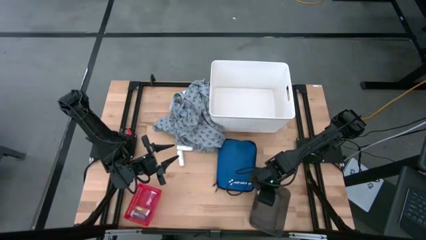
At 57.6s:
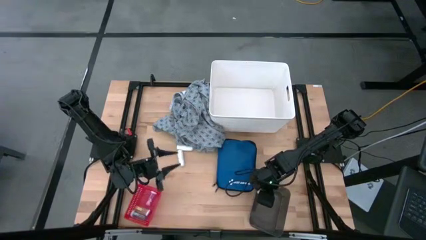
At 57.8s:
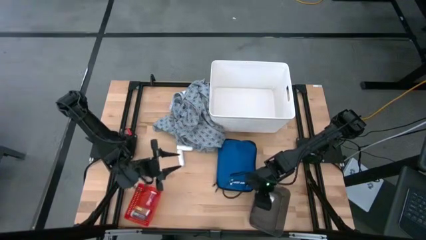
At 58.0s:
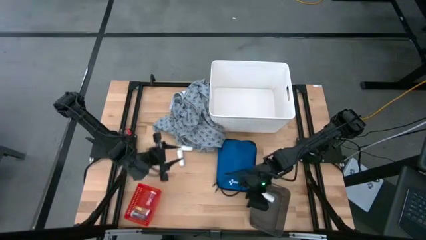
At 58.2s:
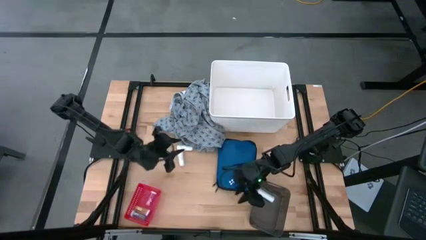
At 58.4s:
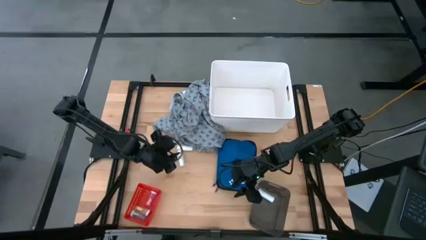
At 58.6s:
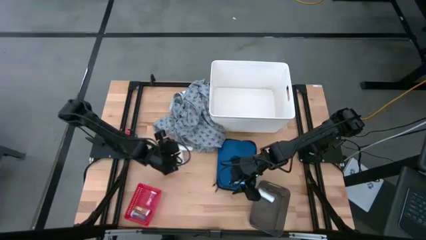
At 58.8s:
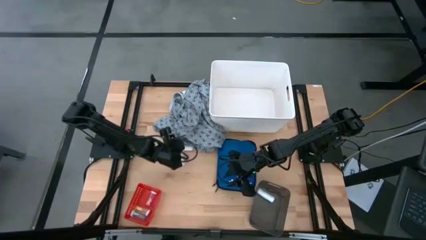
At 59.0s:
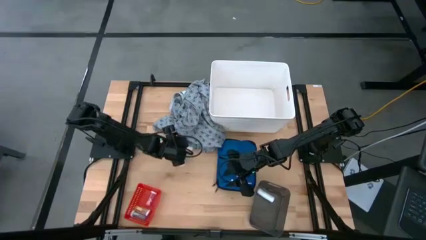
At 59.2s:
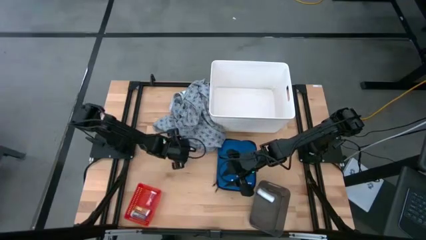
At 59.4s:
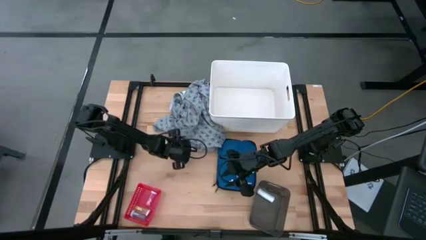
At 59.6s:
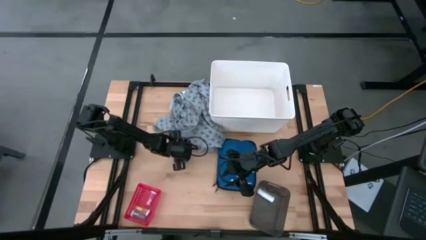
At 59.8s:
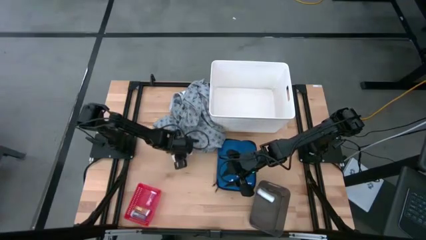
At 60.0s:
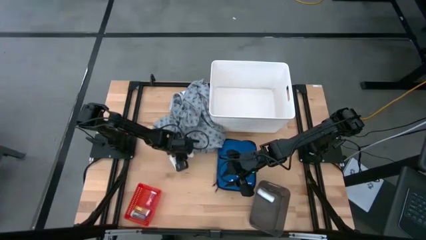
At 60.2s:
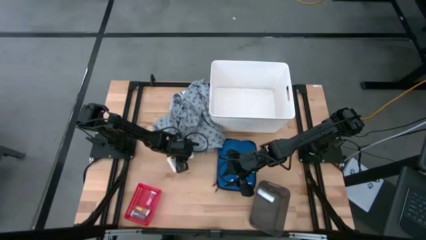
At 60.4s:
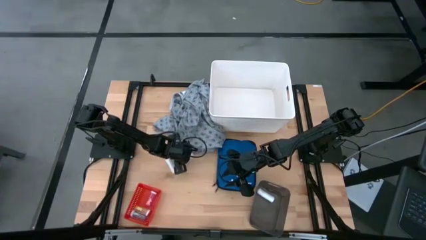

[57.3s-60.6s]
Task: Pick & Place Medicine items
Put the top white rolled gauze into the black bin

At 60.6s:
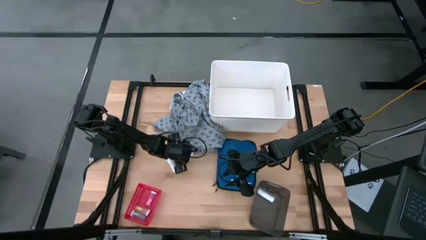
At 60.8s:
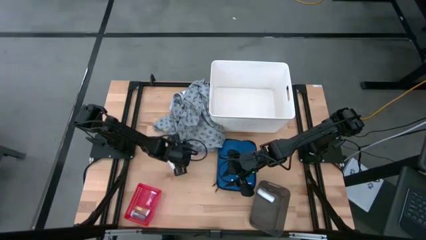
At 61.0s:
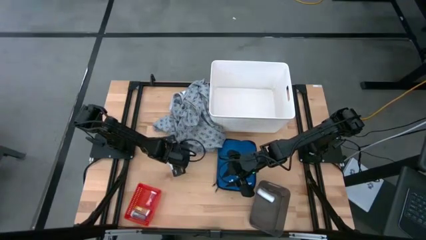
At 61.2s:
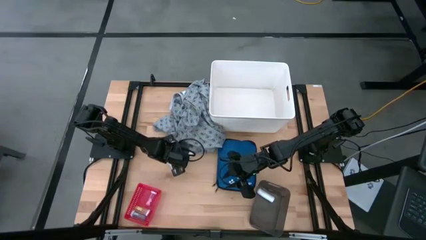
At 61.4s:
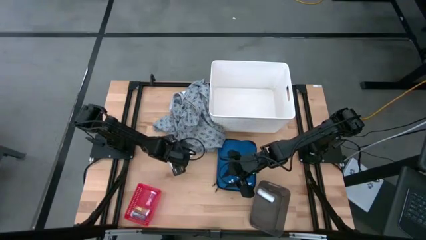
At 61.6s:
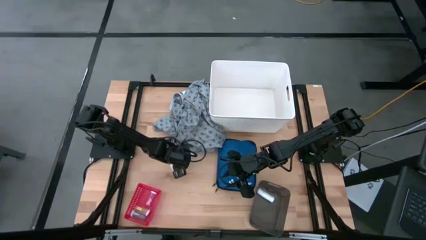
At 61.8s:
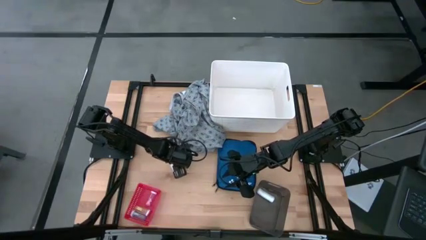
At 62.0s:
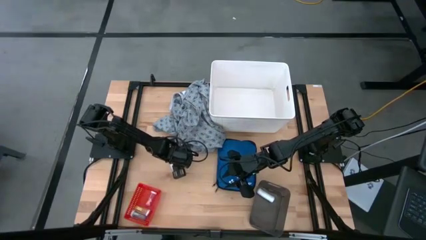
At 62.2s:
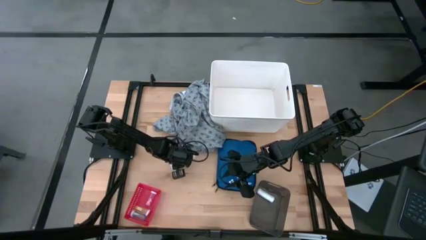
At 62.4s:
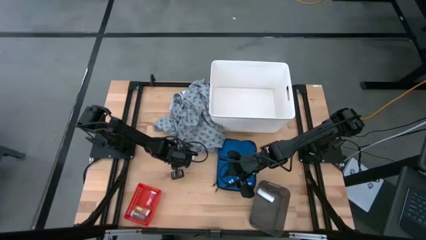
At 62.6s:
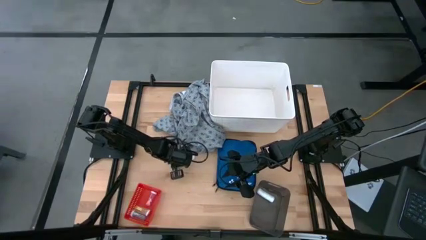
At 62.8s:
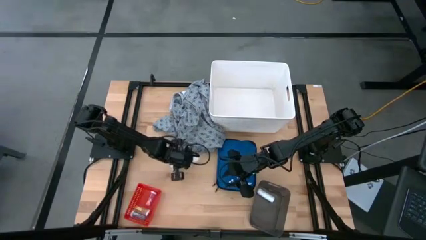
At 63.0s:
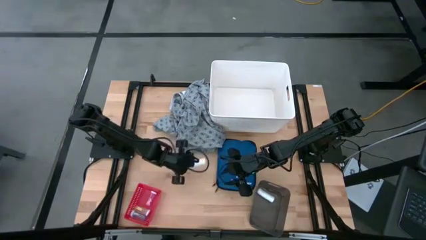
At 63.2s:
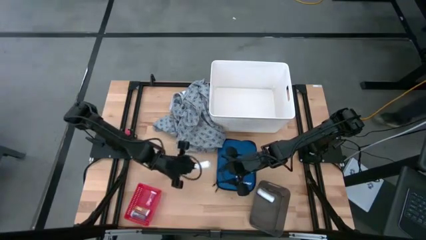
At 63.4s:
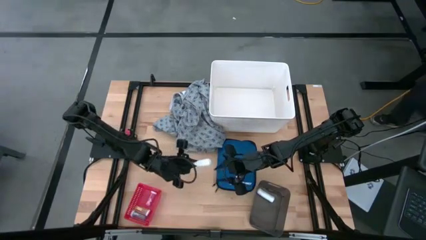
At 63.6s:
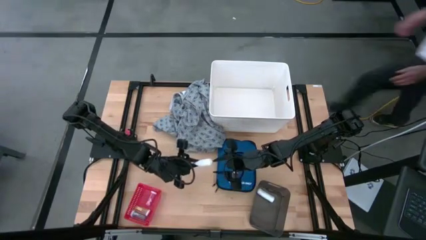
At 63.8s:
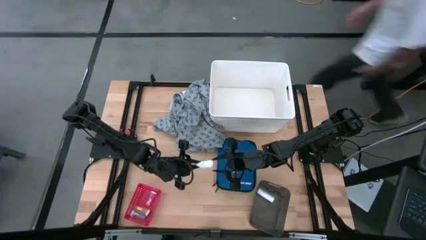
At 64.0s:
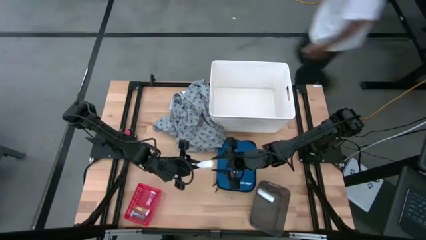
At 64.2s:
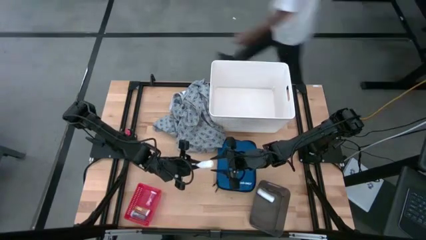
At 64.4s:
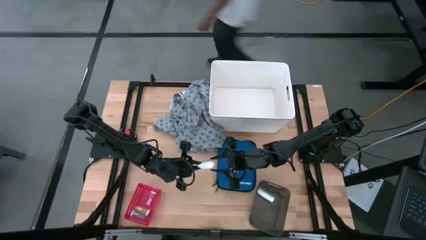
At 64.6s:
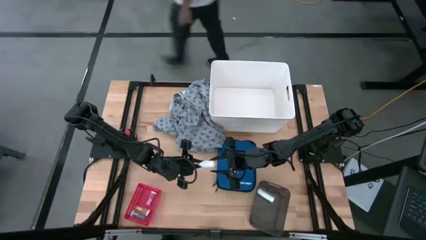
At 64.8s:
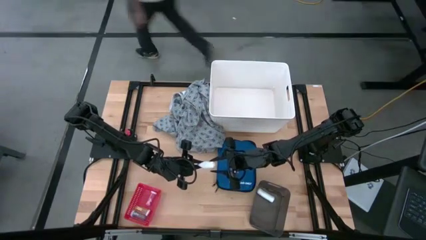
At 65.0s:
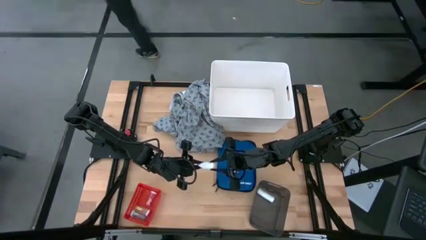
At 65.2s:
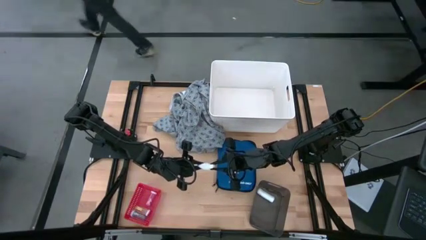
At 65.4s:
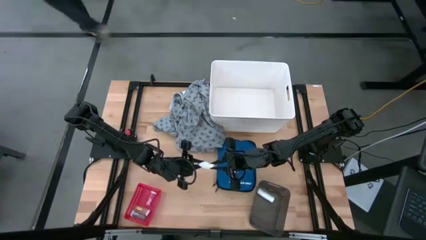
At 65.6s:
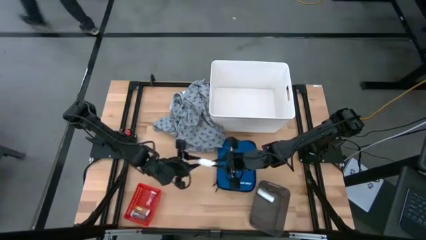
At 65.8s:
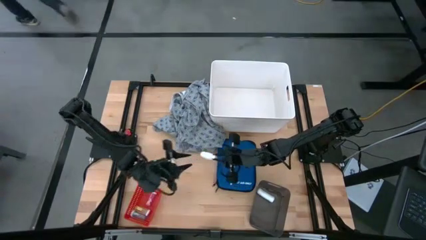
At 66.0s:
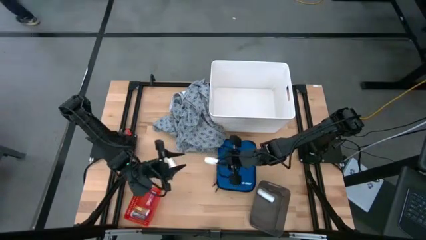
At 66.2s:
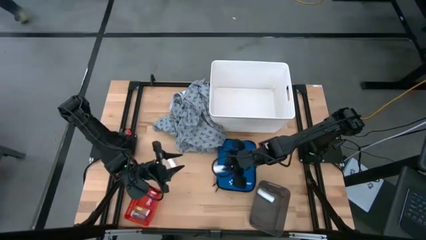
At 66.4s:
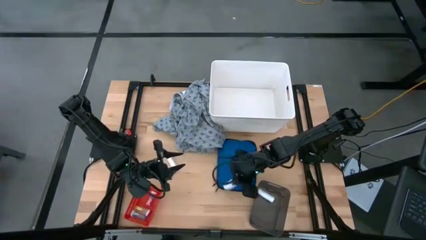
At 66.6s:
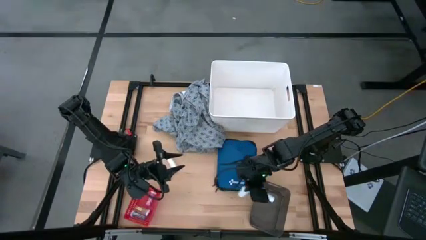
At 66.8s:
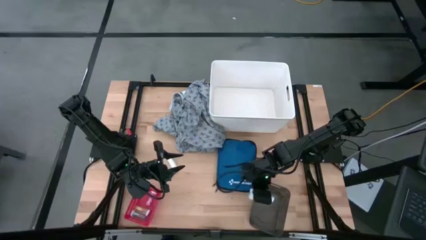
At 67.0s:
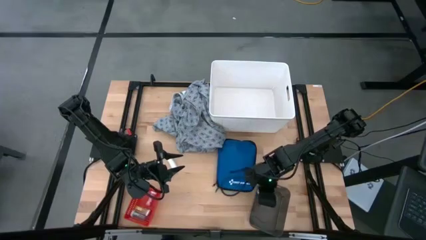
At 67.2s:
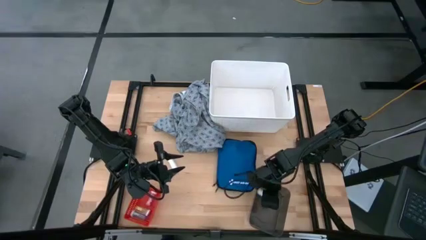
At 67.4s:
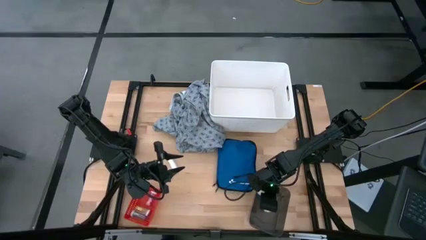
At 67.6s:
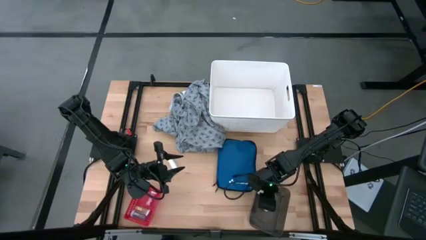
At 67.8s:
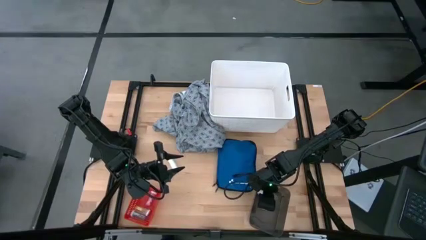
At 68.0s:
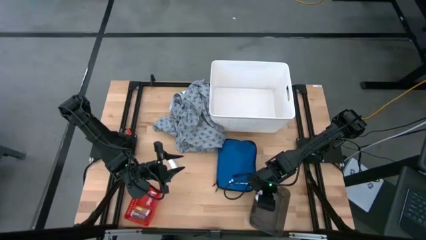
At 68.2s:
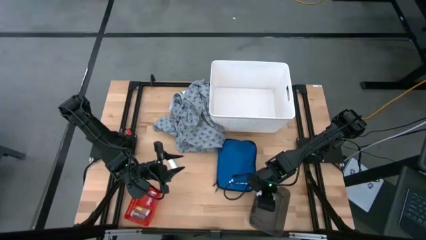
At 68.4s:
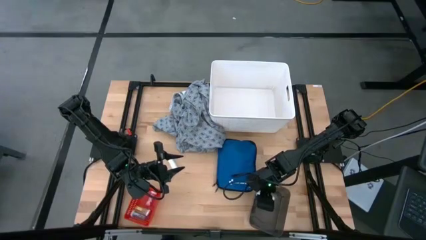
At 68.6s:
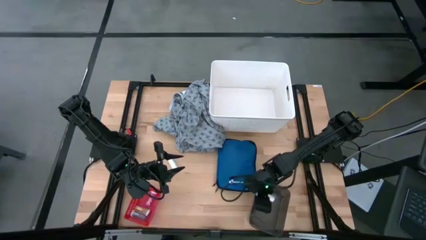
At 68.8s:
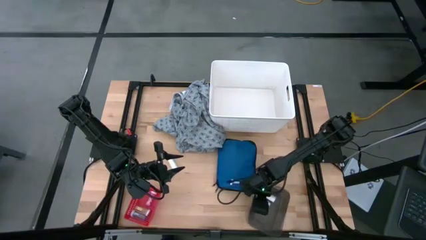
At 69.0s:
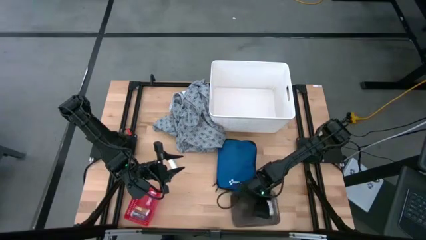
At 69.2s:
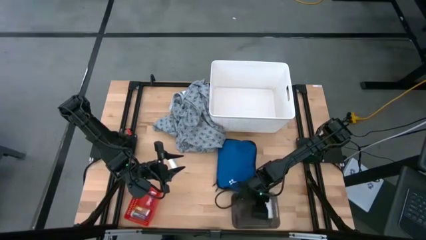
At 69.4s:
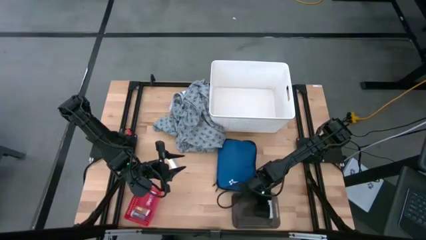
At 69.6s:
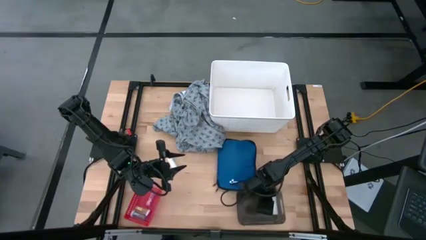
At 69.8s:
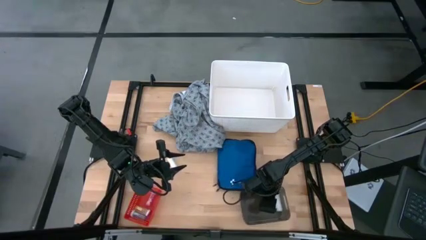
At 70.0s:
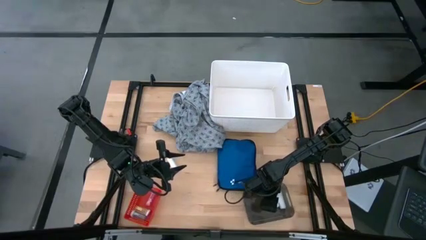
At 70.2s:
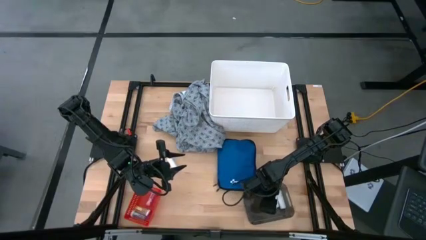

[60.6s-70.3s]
Put the top white rolled gauze into the black bin
